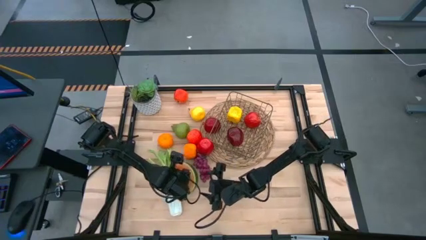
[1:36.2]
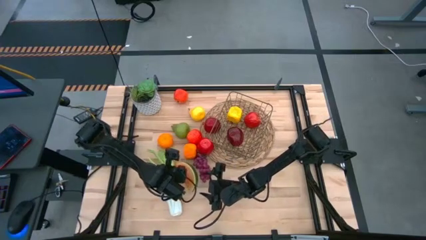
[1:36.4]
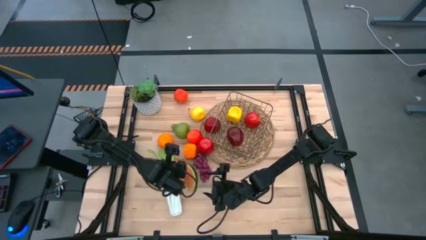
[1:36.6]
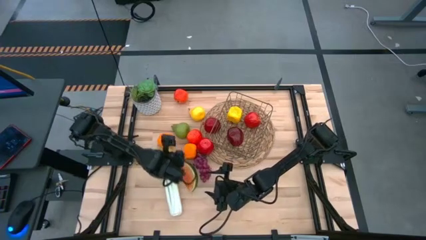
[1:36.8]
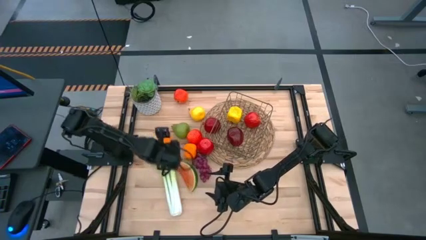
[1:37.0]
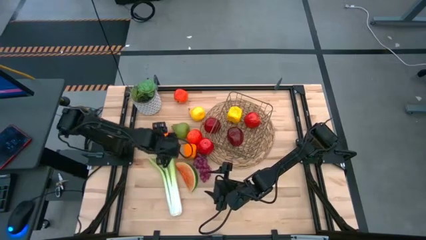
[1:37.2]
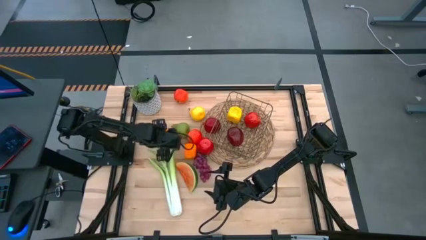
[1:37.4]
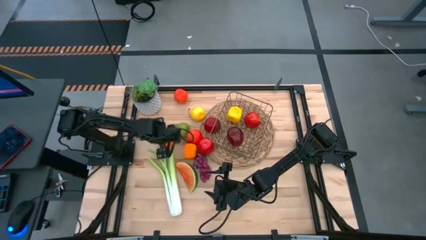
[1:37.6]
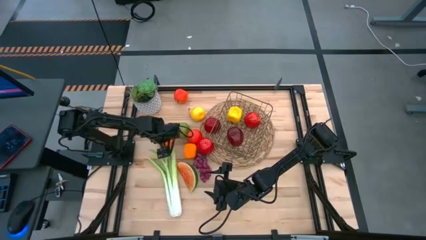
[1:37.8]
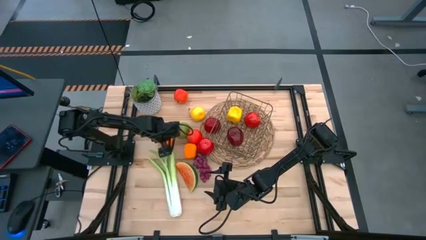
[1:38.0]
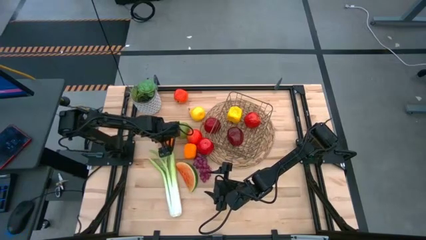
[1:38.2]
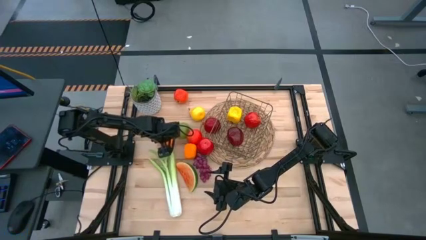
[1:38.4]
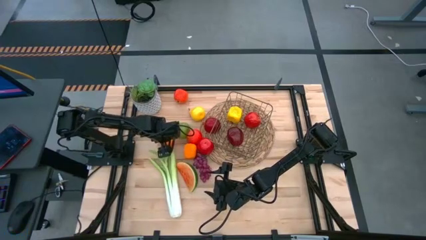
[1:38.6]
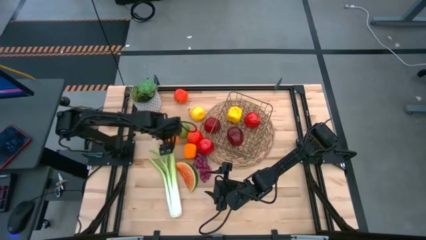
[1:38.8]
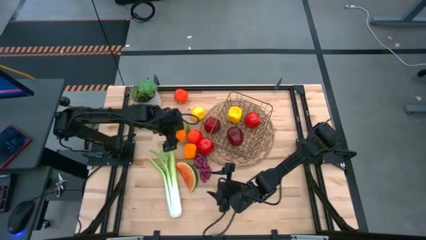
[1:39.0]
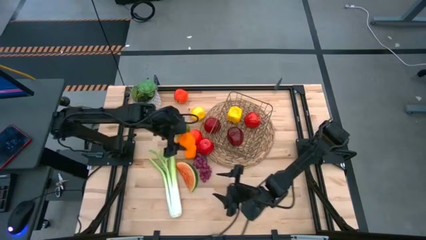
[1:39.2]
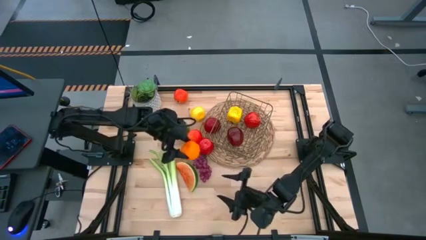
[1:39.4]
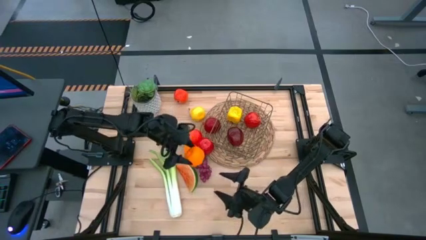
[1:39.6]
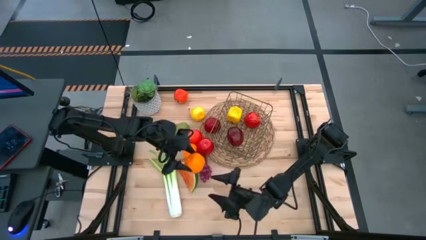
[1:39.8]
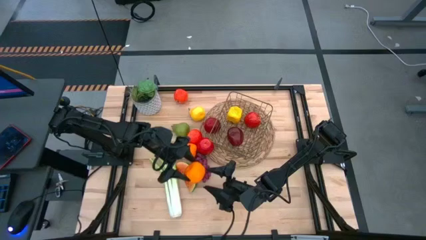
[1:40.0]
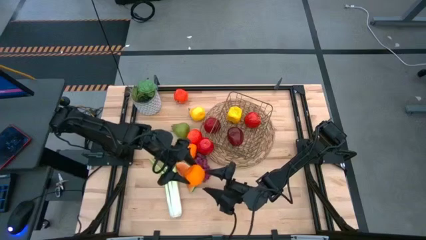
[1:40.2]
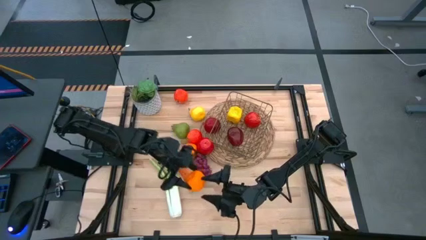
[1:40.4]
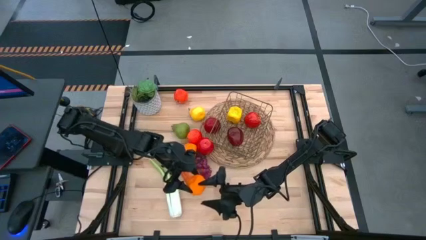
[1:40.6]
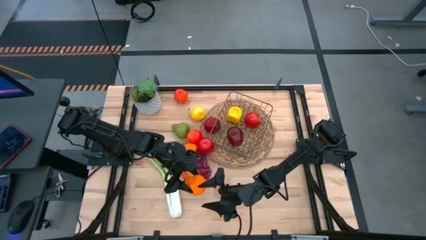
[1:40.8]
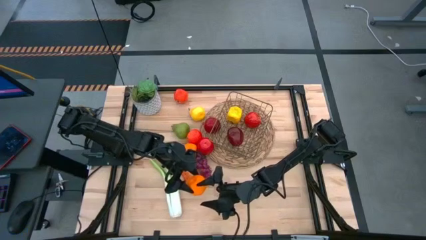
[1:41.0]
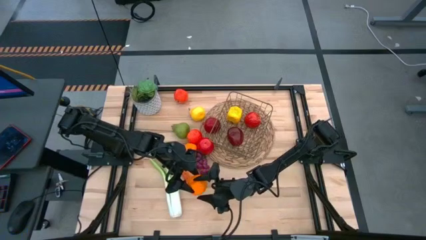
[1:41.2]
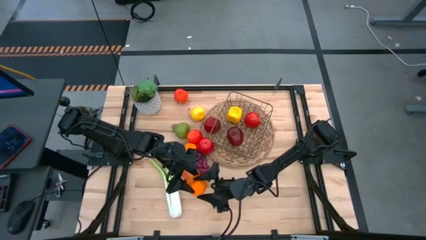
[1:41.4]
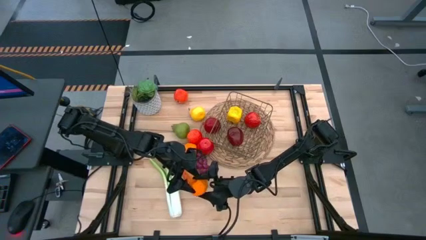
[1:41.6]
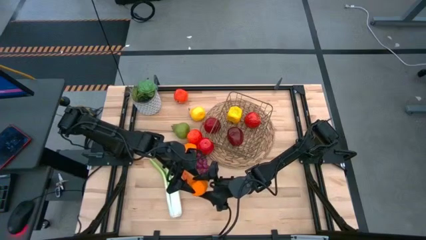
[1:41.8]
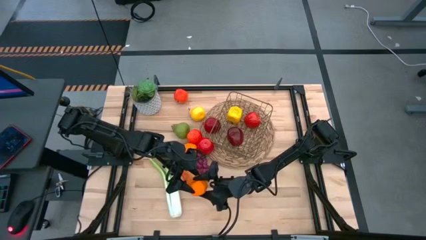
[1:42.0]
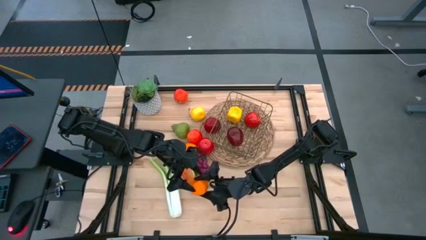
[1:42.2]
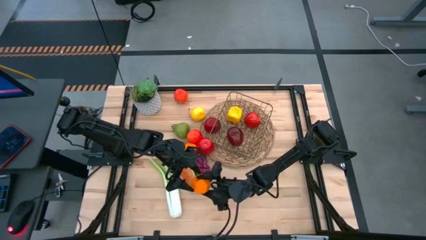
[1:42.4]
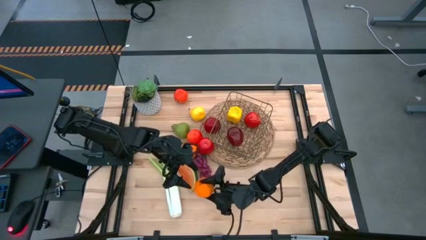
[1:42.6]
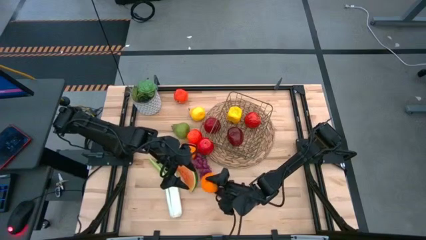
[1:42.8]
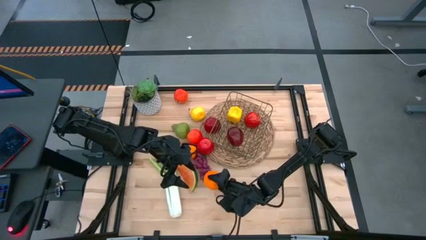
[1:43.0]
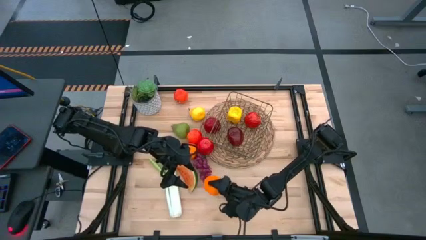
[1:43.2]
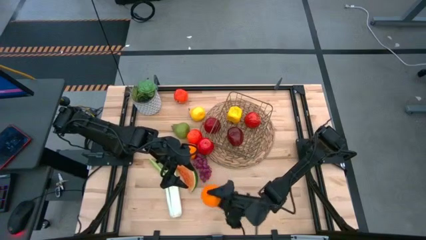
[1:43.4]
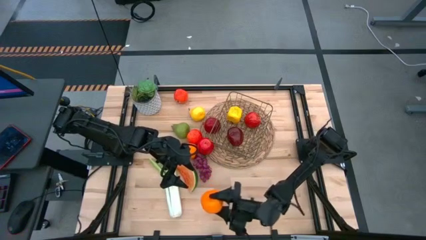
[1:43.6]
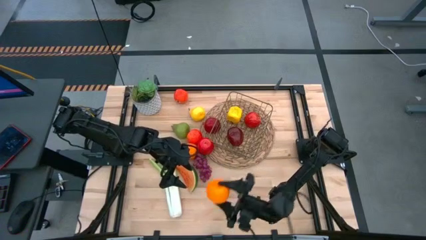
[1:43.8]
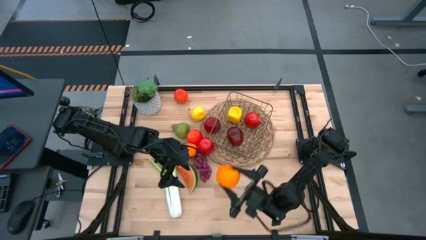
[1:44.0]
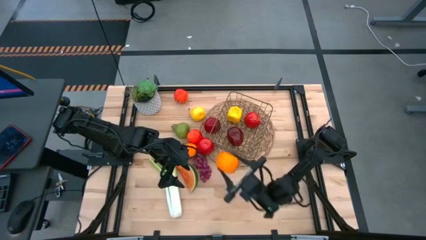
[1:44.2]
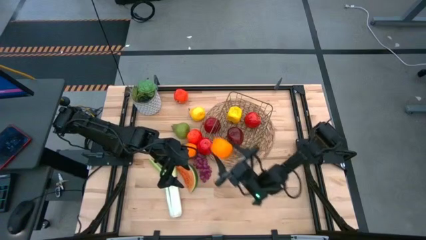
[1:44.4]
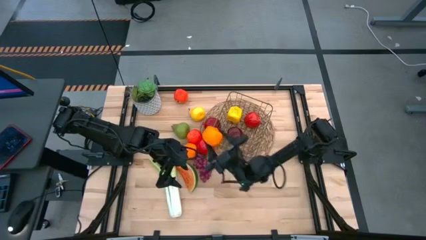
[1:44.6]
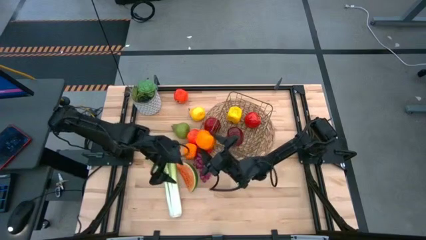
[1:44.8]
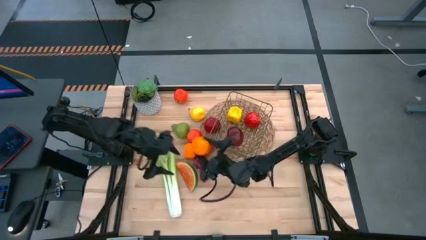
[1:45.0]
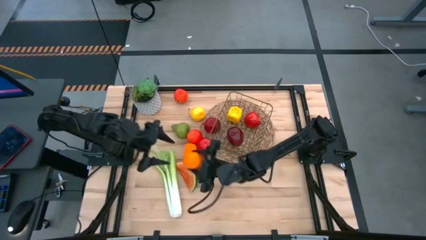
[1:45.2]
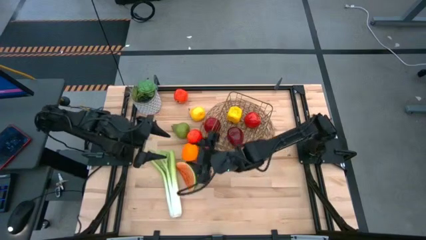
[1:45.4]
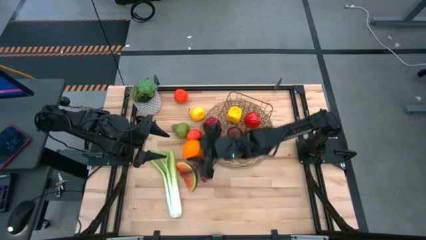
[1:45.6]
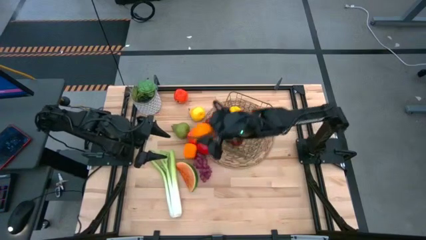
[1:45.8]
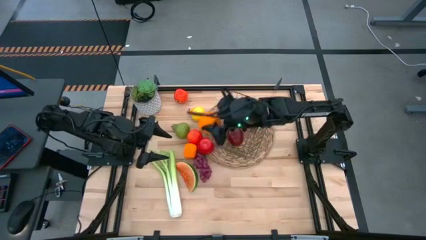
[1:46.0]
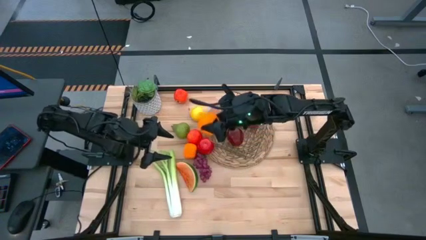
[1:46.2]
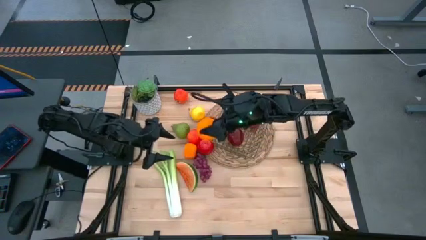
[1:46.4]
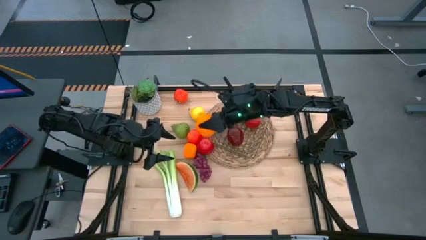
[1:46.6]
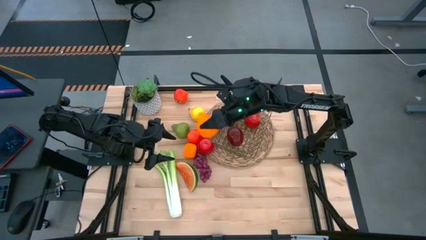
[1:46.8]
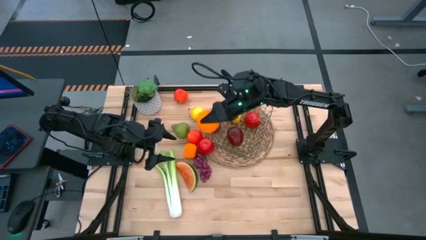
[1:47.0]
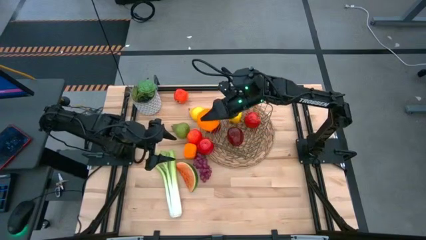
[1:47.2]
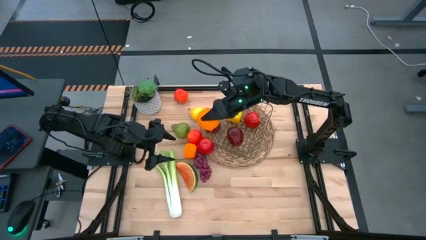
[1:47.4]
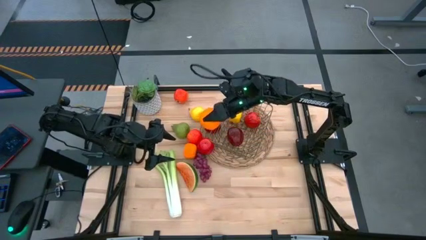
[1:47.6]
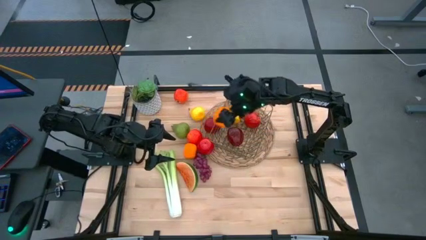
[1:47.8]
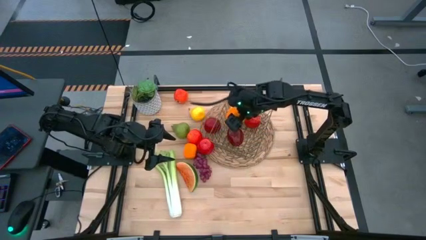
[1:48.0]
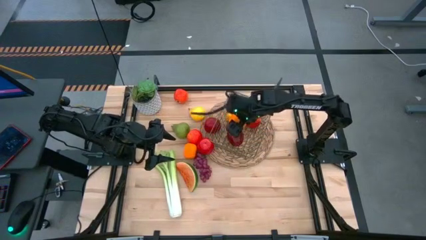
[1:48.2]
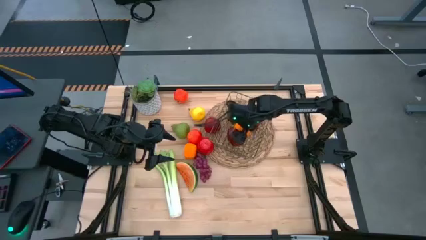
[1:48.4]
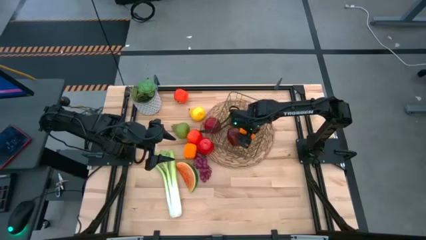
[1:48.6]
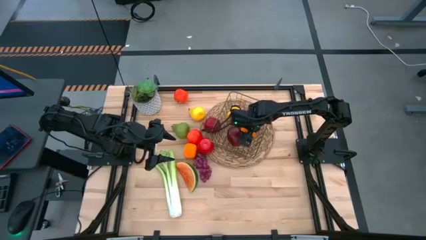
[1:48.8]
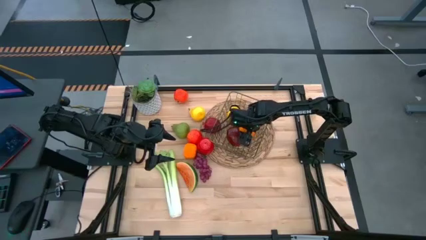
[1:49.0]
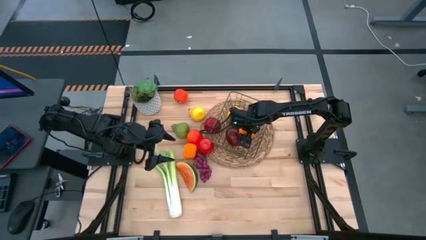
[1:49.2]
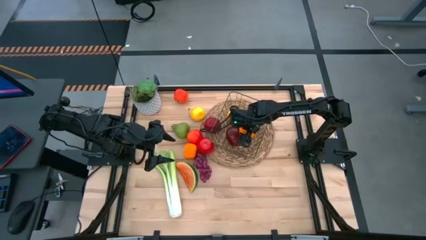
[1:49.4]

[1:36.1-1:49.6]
Task: Build produce basket
Put the orange into the gold wire basket

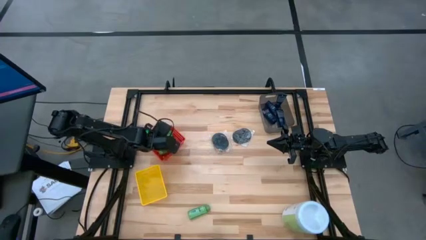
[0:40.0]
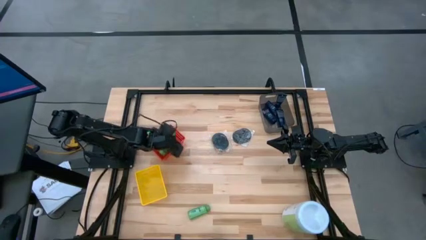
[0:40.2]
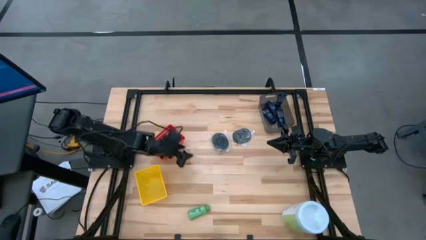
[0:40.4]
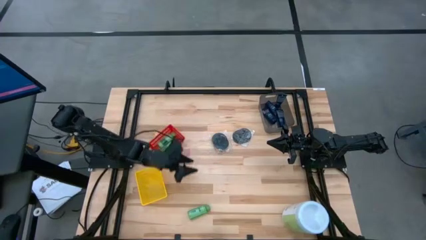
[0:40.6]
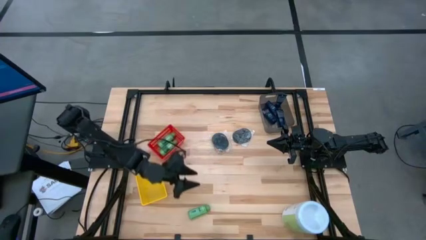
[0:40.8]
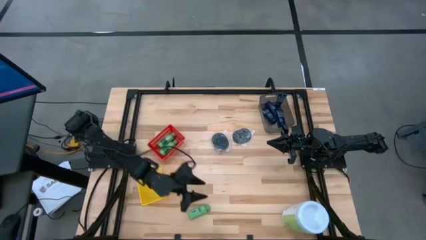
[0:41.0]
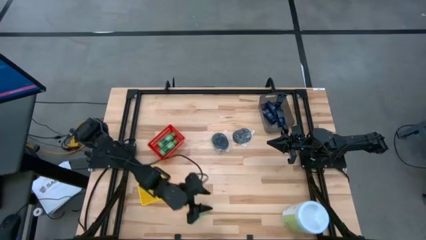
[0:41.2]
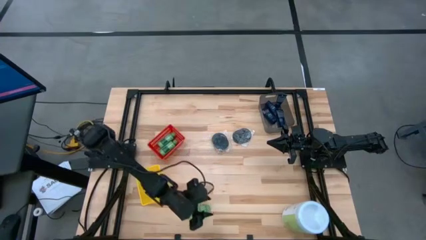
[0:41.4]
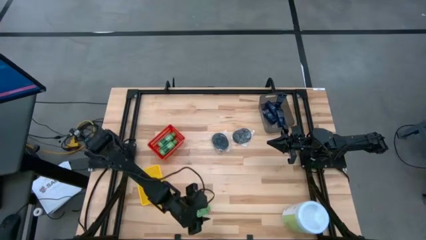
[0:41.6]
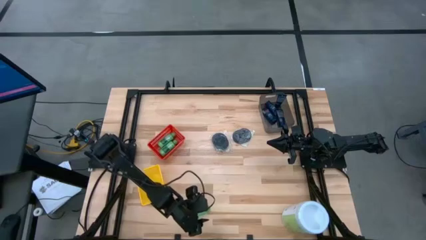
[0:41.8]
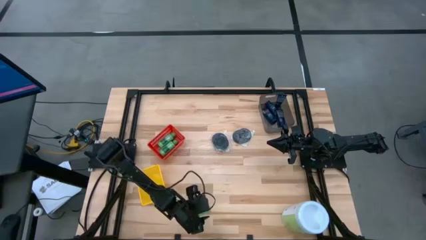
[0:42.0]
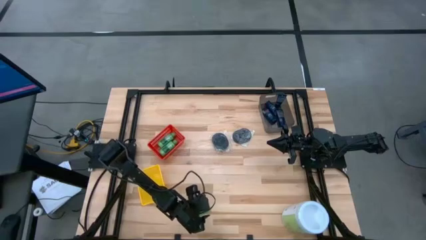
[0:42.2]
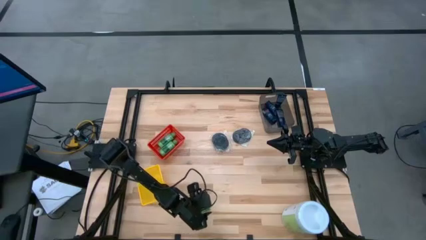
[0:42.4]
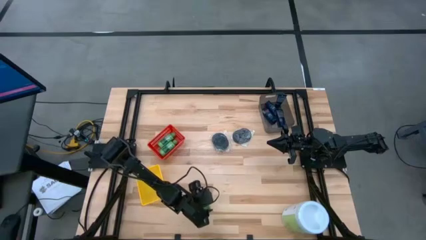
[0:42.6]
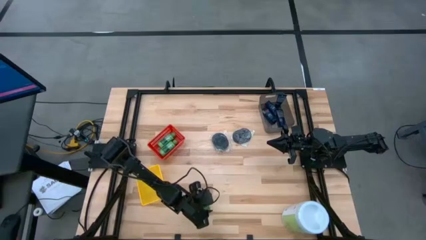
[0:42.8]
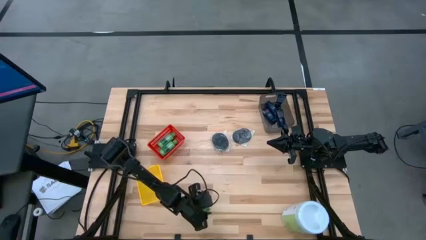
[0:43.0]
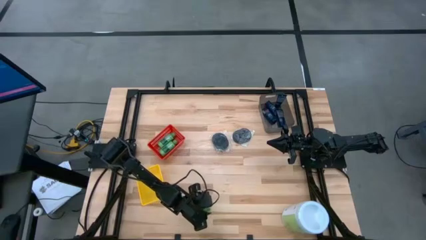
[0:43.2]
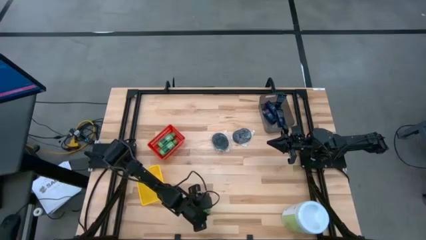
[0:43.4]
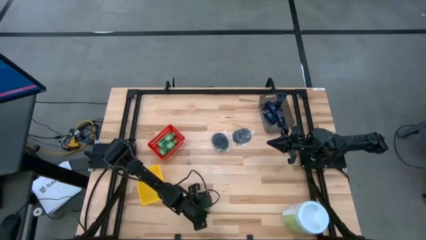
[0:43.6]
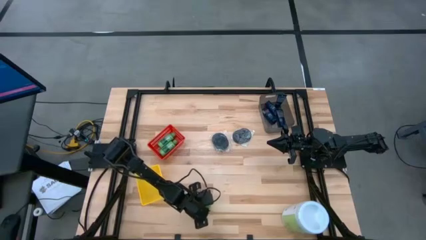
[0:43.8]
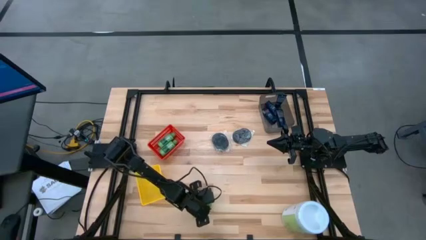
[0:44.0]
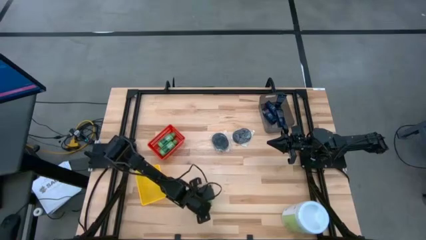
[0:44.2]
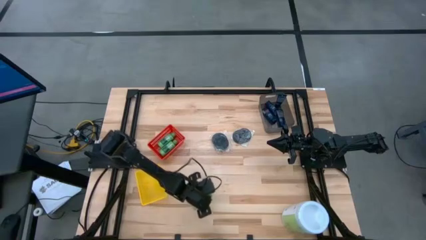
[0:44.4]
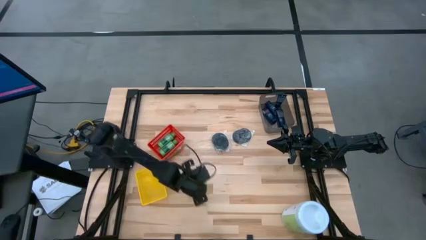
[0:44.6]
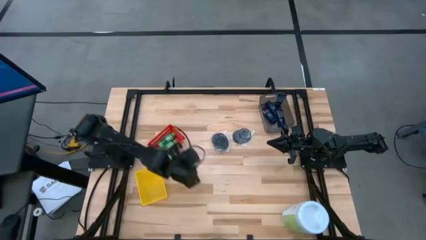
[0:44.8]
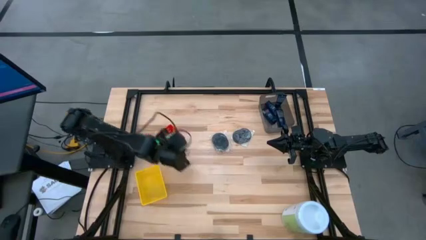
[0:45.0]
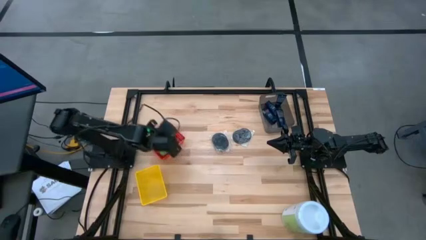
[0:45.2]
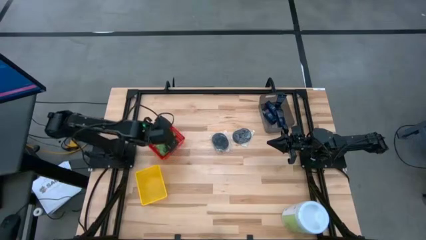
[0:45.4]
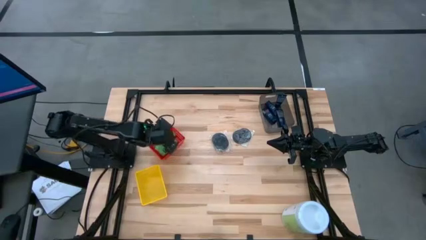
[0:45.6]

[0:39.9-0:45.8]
Task: Pick & Place Travel size toiletries
Put the bottle of shampoo into the red bin
